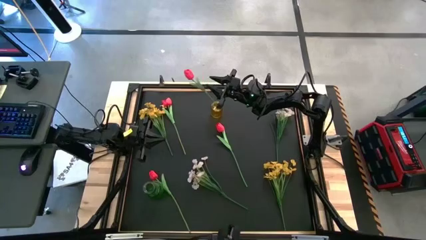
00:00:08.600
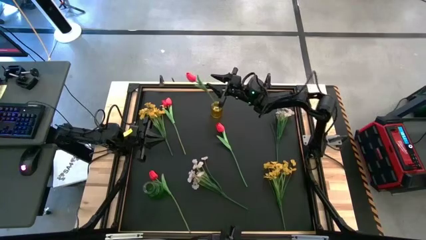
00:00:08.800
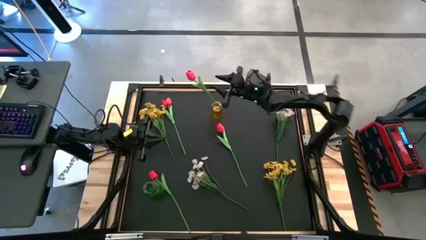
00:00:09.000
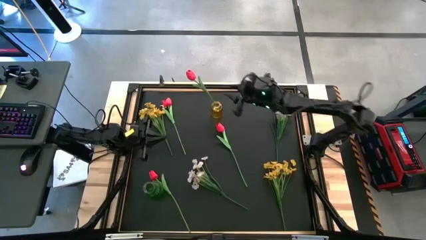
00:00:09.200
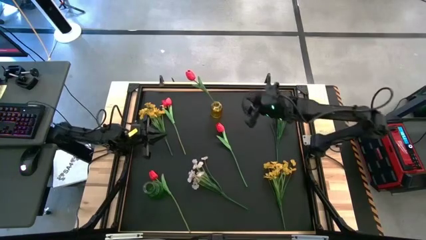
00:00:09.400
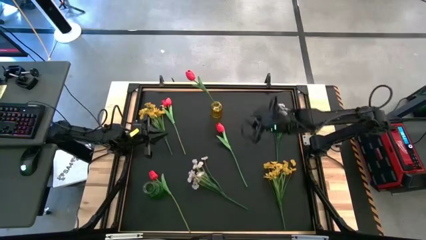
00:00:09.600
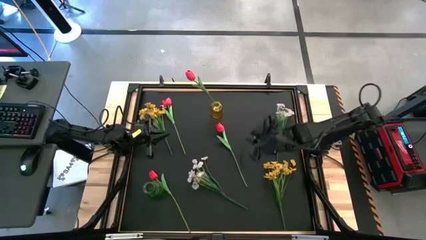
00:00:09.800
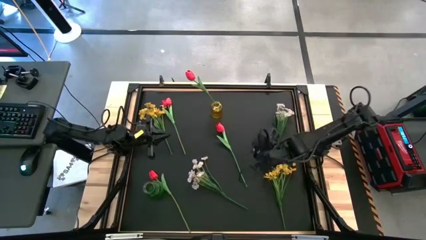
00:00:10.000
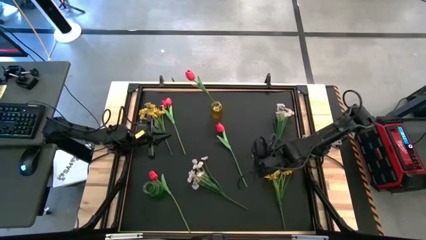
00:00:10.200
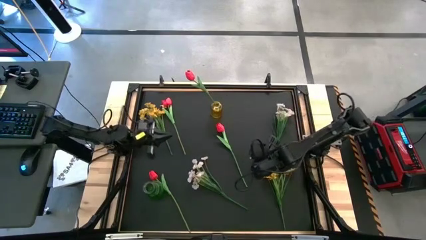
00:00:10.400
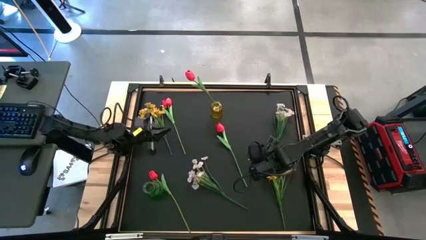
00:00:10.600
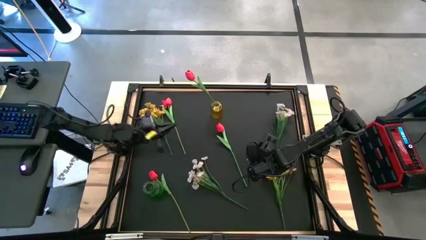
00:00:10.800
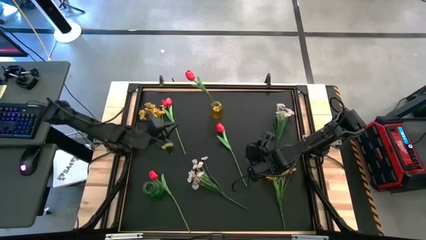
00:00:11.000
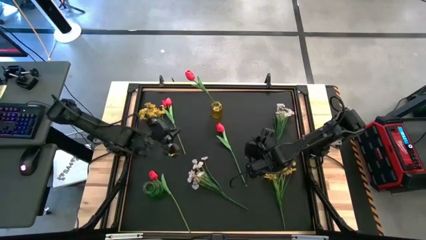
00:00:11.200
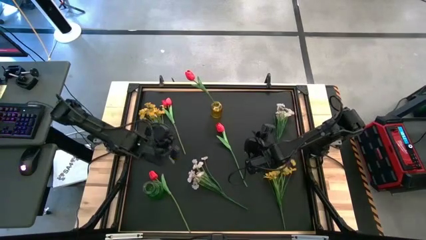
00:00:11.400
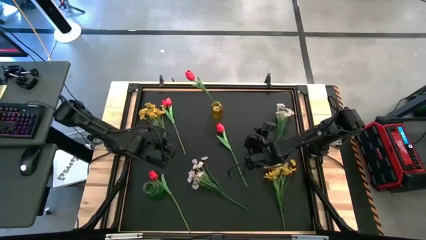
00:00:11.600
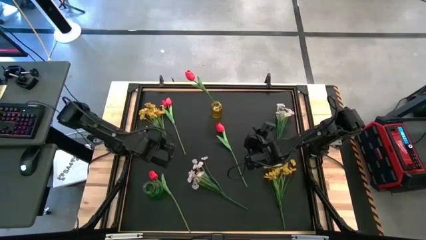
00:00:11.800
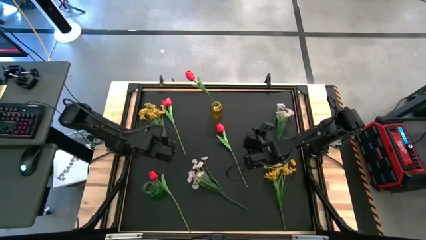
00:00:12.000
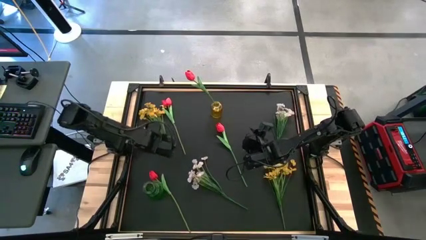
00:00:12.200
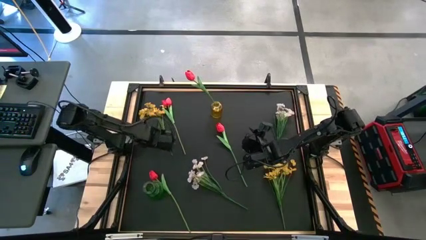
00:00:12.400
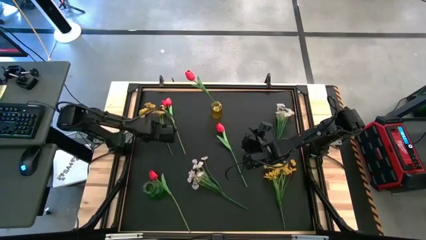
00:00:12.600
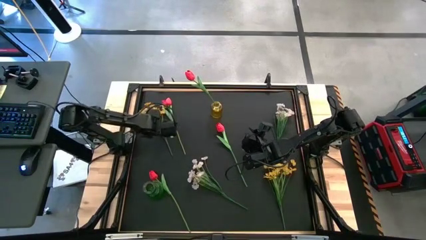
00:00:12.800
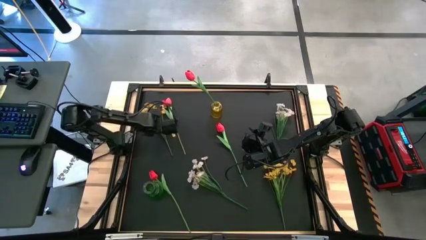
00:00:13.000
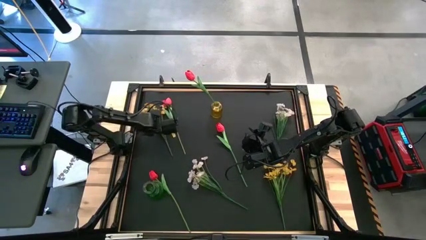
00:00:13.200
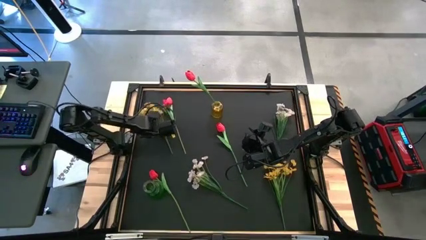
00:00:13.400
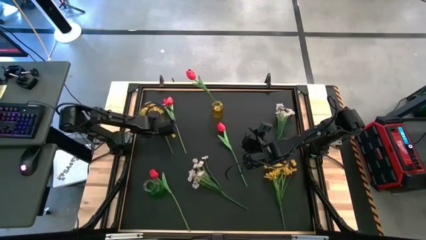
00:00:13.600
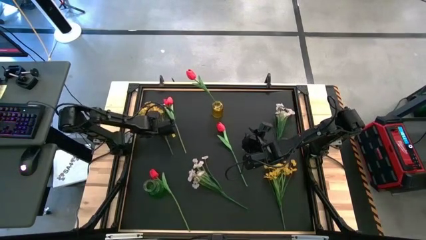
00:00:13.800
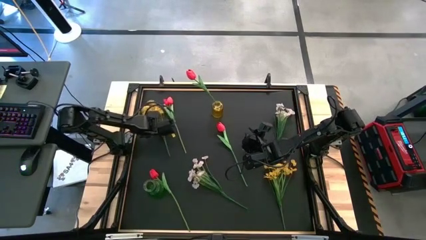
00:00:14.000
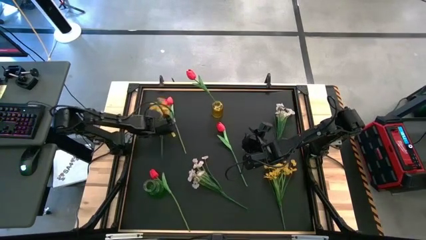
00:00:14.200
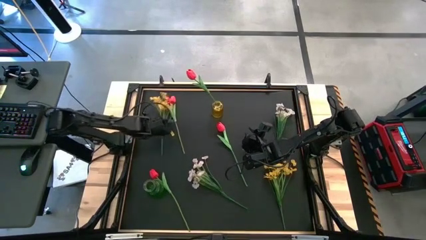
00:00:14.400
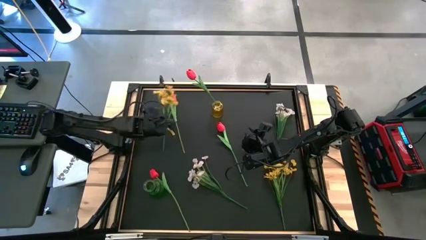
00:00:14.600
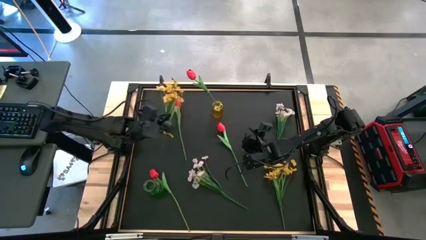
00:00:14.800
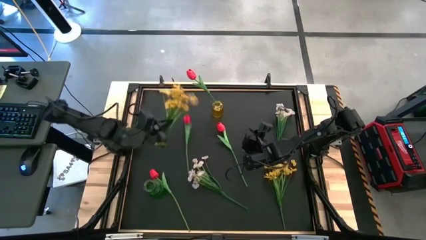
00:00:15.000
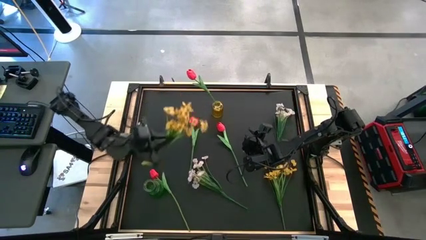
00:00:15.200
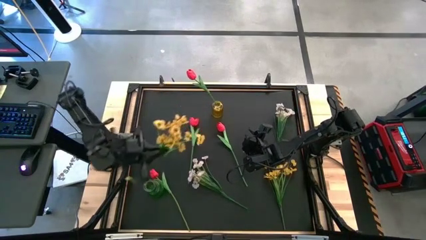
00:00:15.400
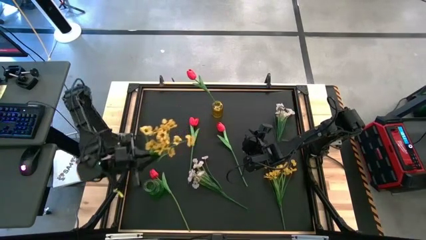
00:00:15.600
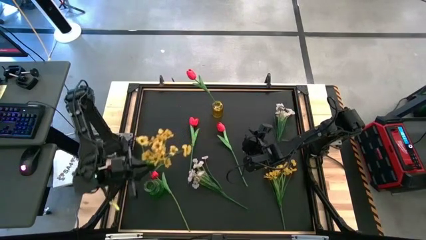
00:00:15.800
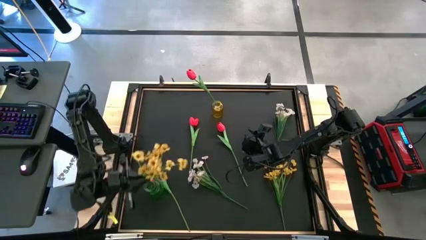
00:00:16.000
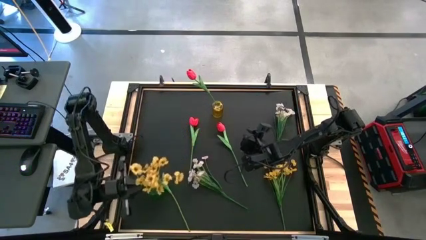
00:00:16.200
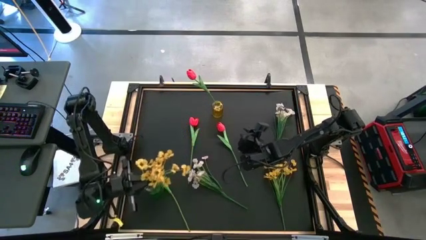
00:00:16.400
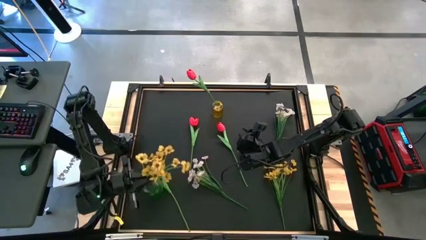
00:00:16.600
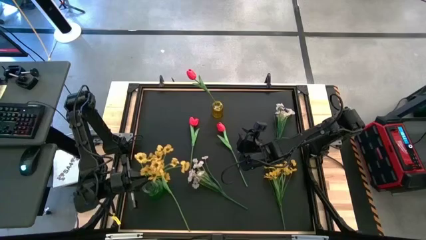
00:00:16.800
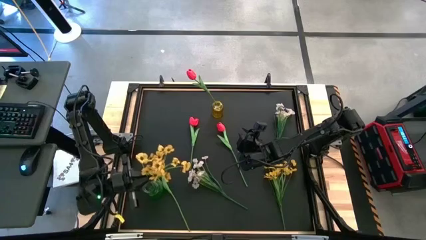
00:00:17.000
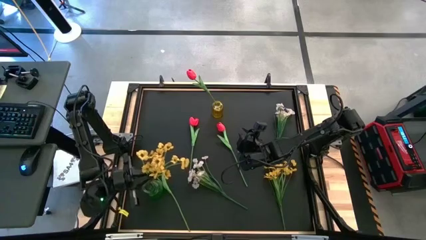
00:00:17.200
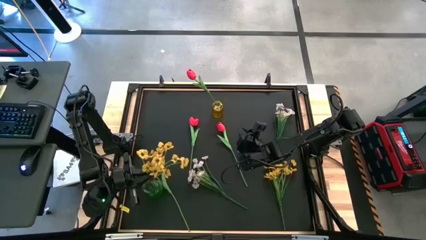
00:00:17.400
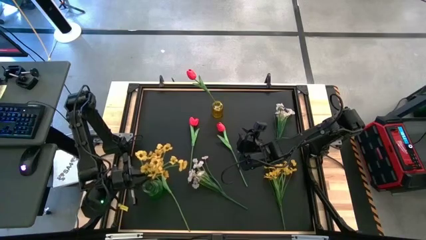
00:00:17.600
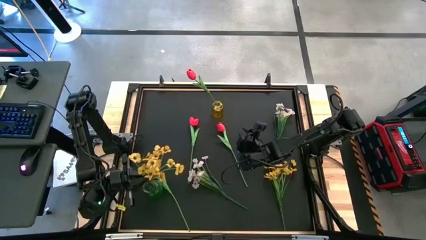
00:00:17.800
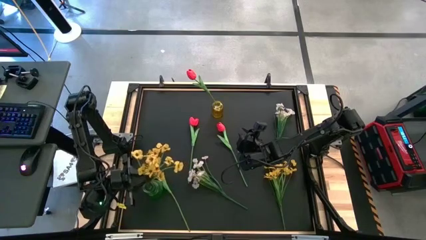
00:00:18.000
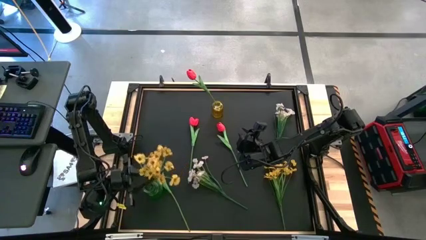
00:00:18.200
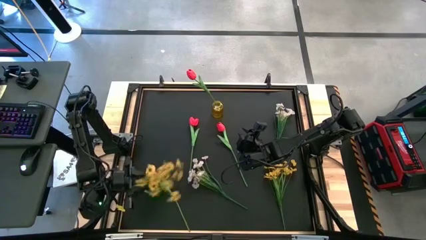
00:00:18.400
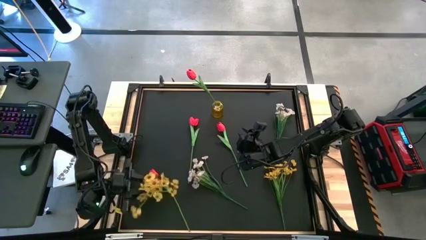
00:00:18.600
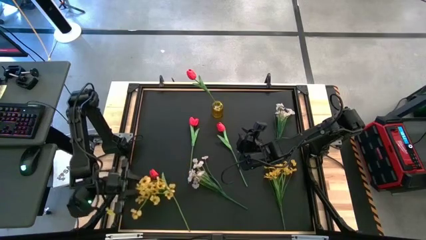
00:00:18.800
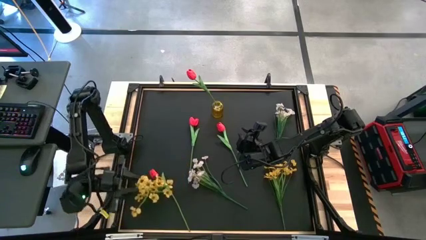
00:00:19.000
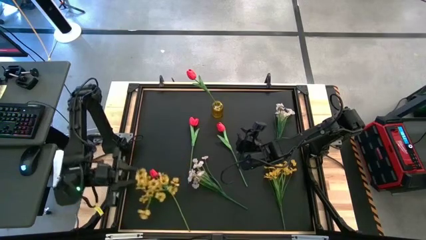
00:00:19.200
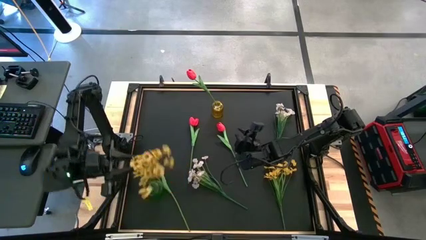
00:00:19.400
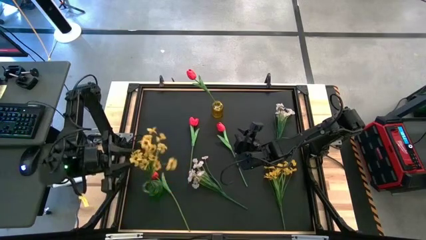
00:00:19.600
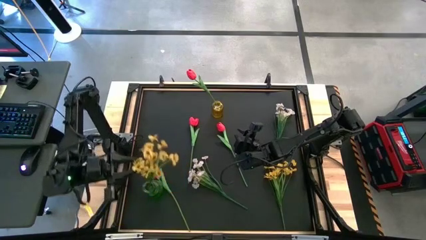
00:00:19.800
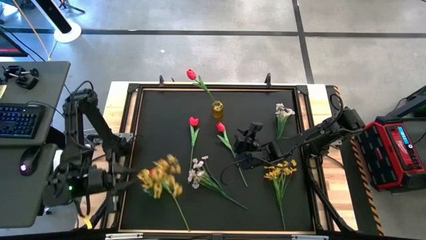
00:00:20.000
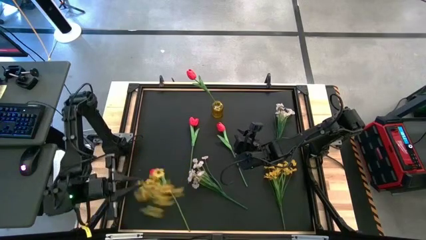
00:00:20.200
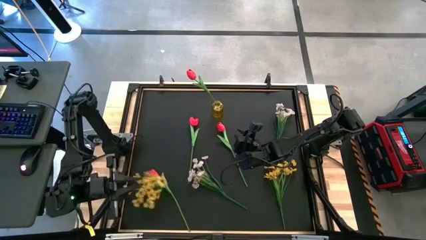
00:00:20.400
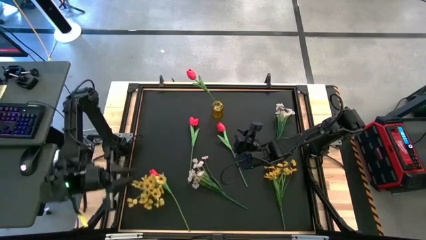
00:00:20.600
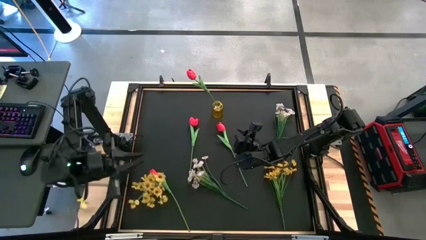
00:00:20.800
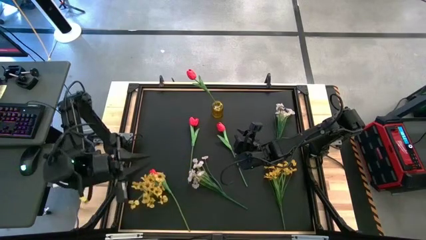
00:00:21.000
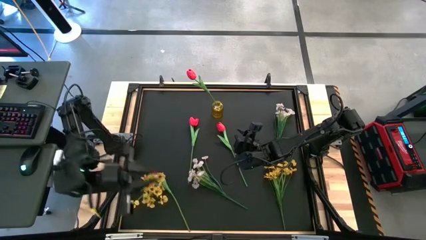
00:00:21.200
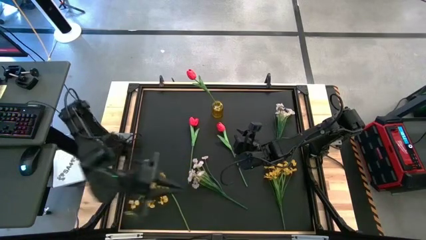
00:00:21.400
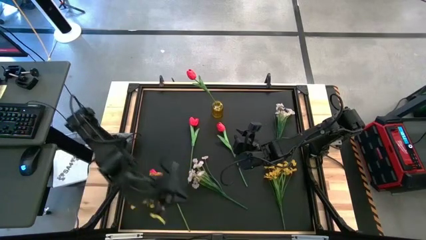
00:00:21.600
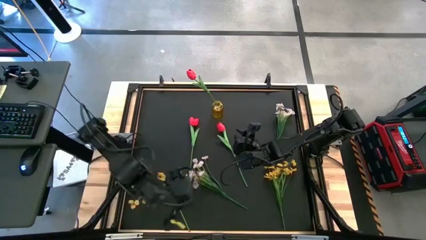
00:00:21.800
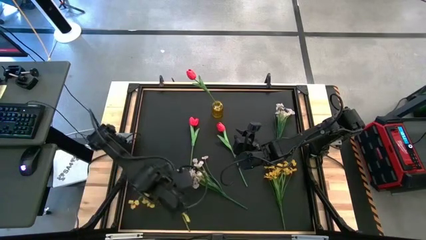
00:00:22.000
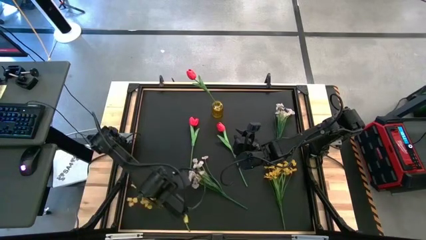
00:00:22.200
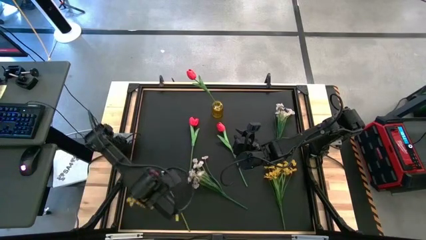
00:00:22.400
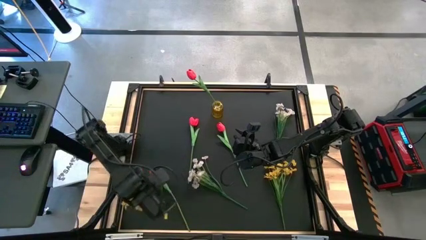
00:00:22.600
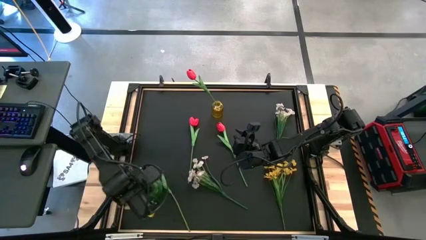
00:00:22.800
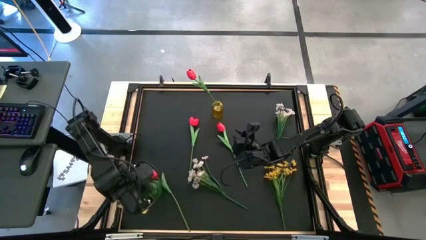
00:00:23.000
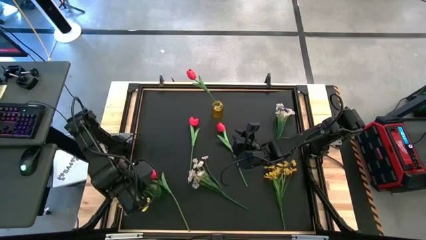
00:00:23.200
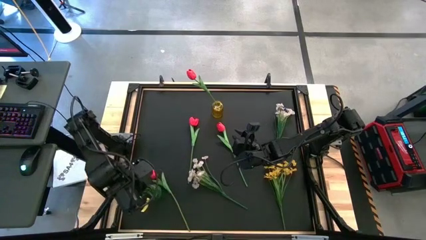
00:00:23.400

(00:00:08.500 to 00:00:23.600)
Task: Sort flowers into vase by color
Put the yellow flowers into the green vase
